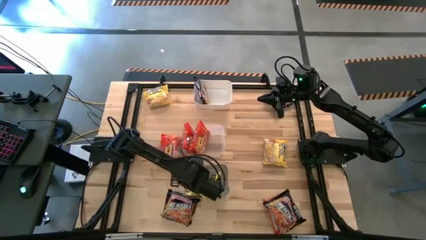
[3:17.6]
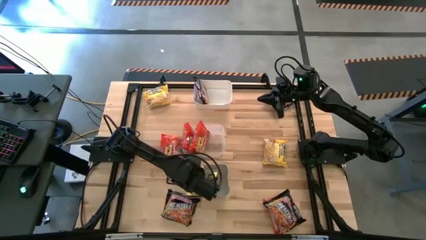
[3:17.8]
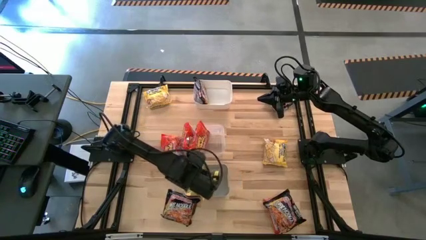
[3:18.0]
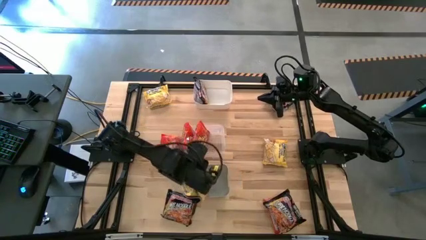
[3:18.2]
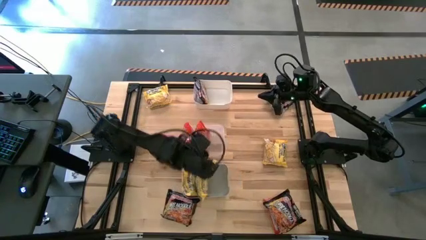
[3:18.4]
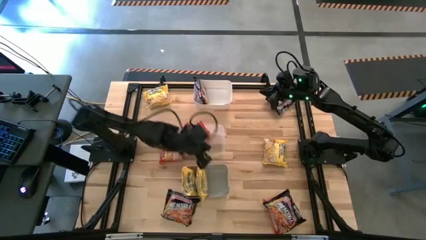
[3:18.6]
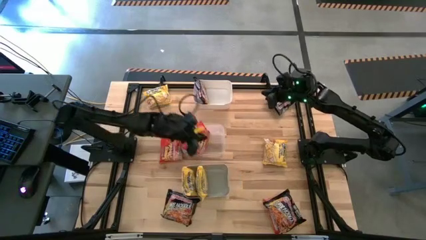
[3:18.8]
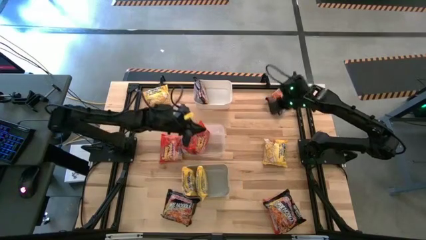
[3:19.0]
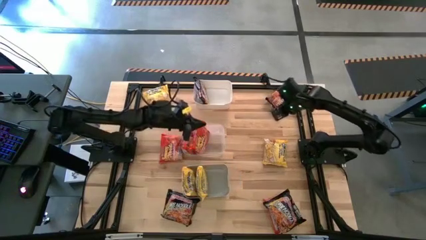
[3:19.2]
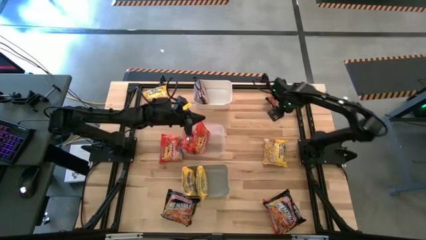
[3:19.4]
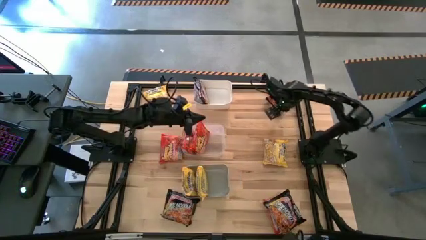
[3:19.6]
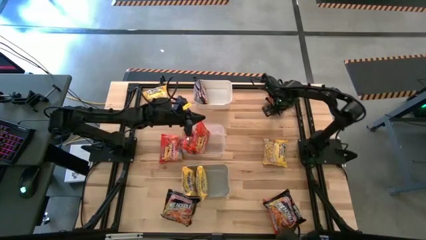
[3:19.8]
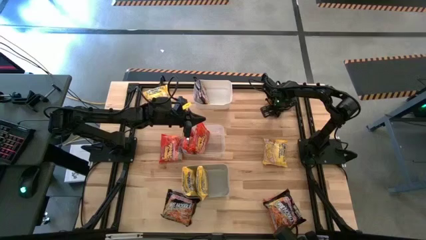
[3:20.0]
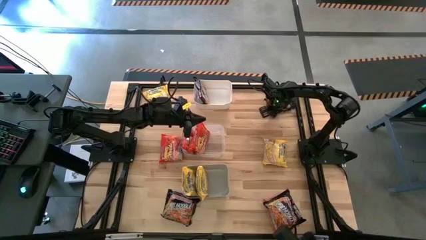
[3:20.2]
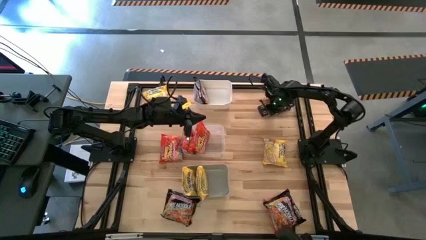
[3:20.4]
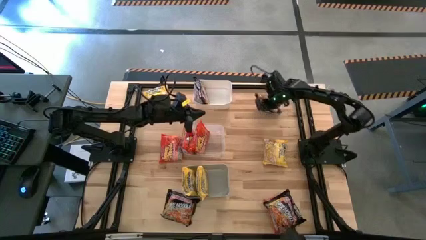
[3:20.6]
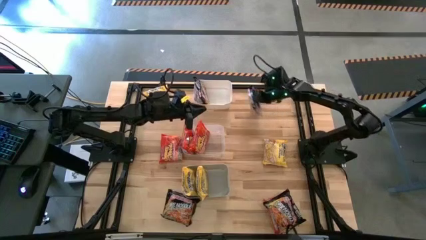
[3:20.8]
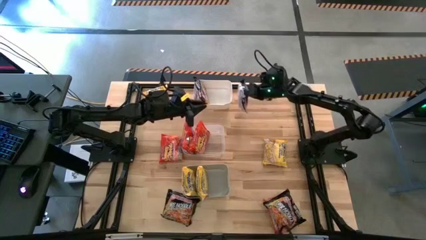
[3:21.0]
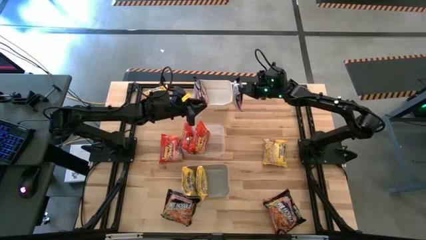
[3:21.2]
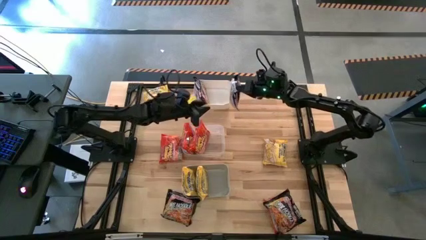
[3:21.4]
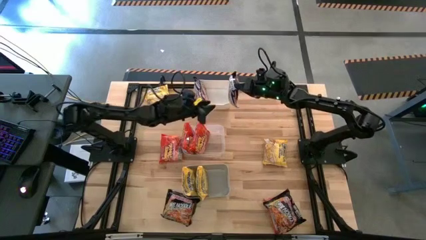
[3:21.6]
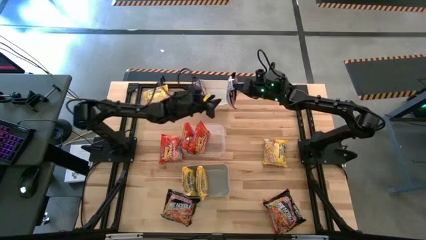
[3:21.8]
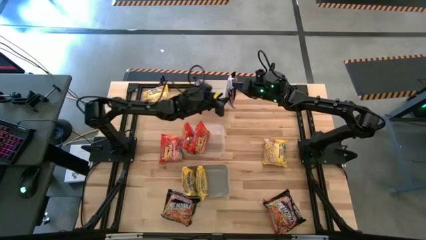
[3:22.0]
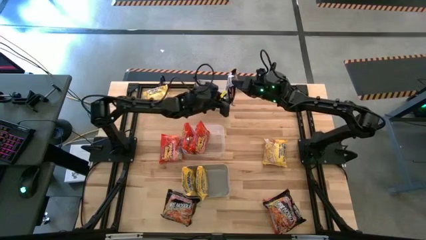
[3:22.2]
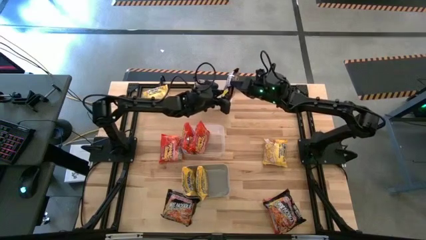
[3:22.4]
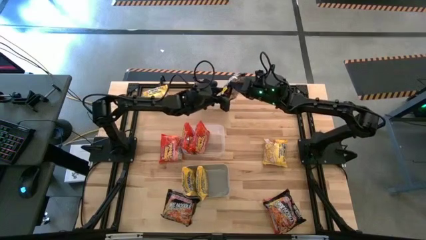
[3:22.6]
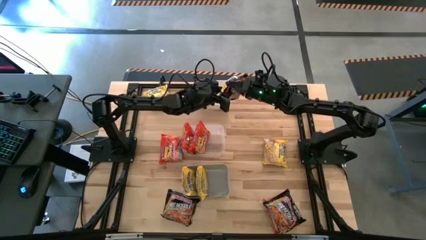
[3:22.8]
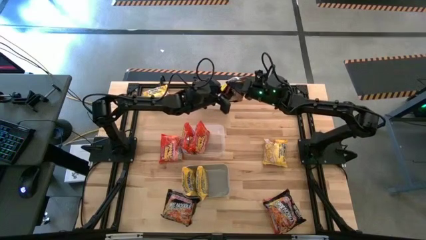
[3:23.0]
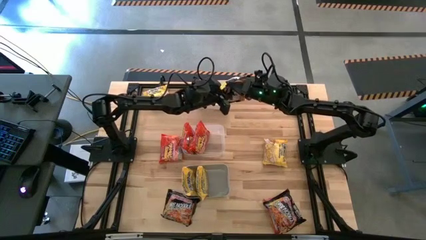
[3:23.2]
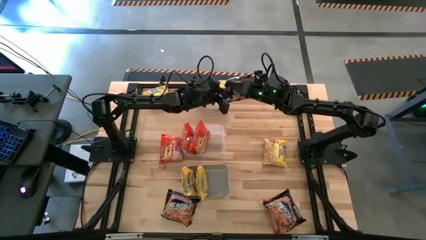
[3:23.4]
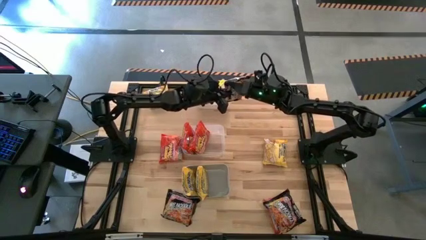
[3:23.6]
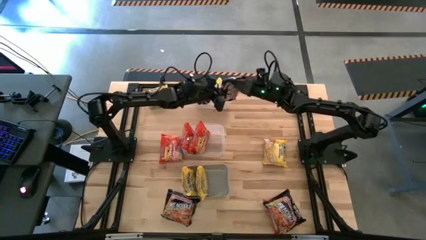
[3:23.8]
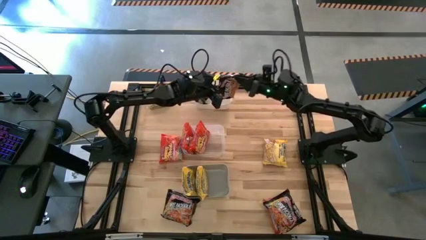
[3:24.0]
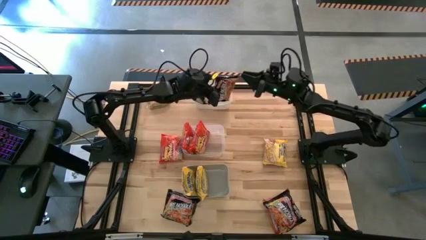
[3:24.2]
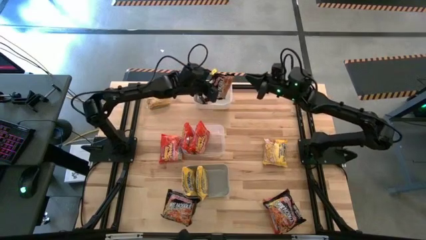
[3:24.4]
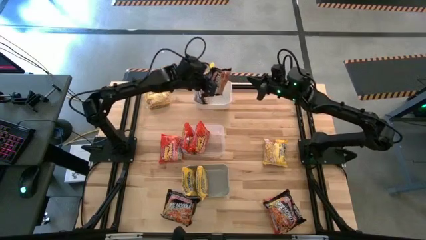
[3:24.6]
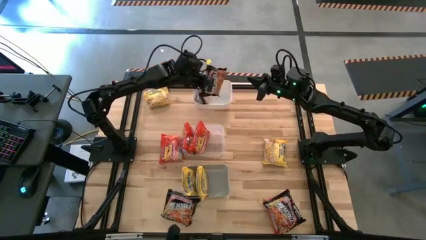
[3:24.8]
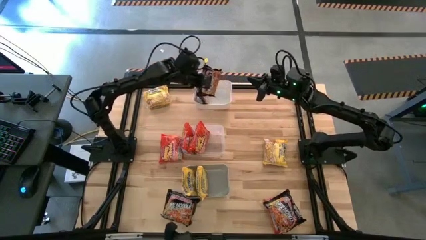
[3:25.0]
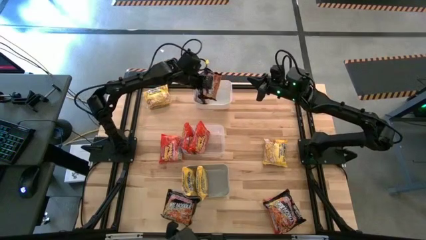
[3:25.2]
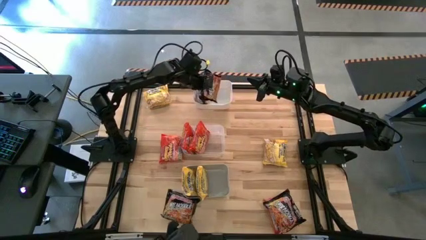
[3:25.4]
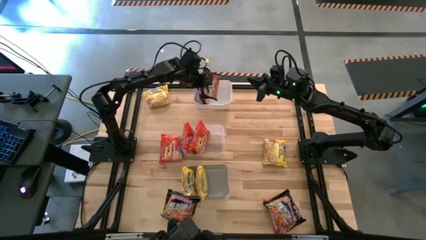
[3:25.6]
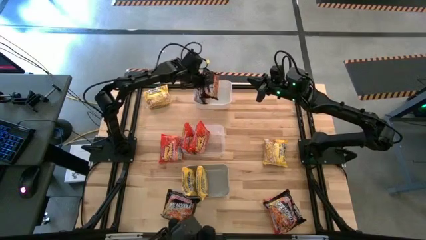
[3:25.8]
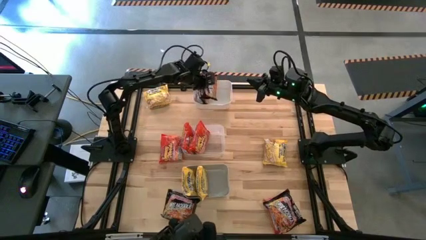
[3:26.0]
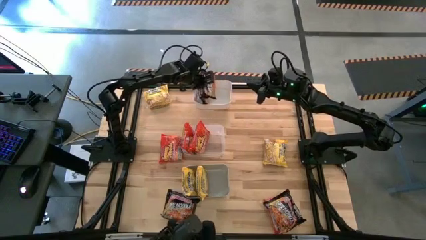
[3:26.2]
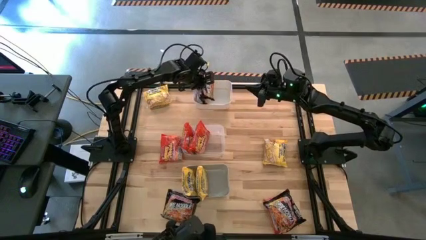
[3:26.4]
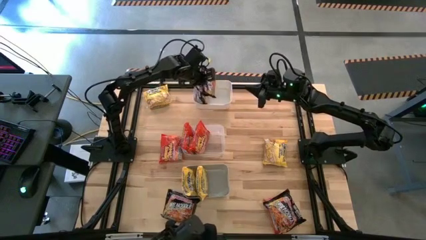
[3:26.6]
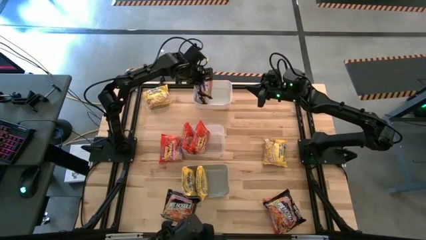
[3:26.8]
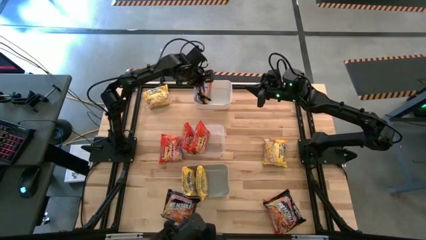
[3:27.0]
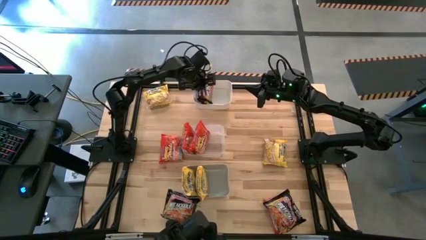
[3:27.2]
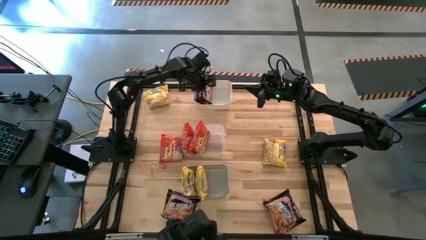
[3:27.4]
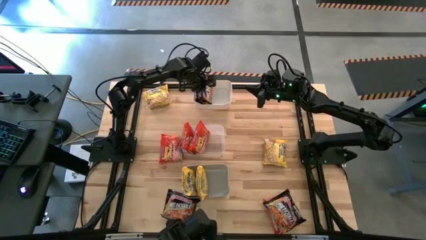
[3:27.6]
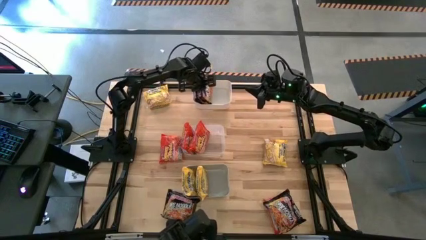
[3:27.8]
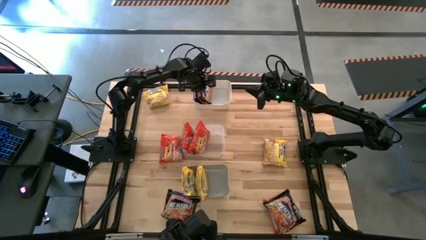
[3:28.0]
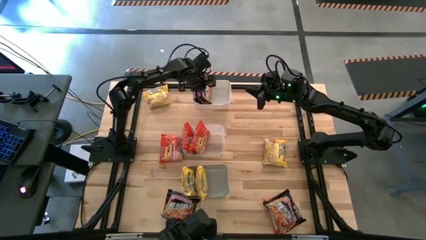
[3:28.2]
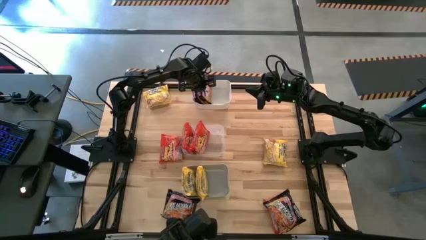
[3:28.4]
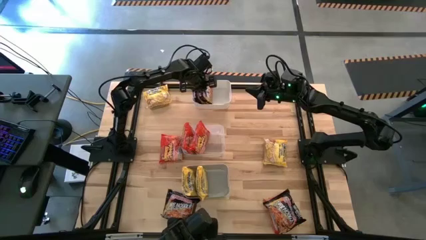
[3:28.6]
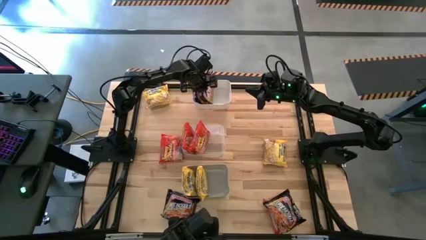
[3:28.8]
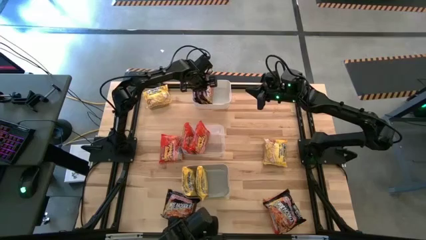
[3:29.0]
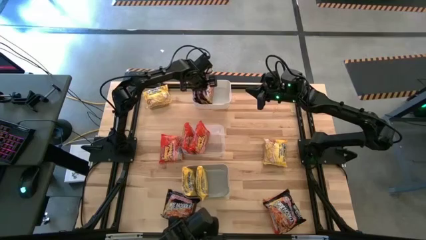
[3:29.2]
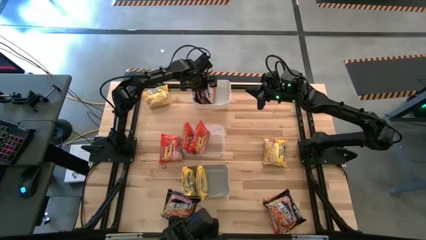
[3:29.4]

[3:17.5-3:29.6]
Task: Sort Maruchan noodles
Put the black noodle pack into the white bin

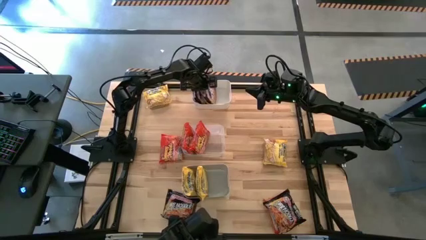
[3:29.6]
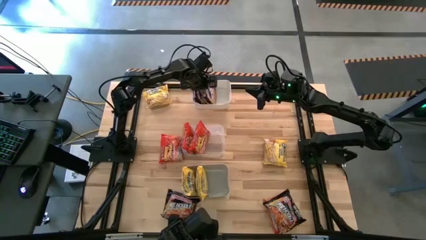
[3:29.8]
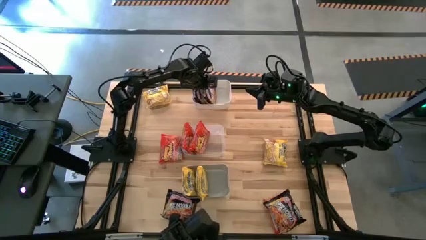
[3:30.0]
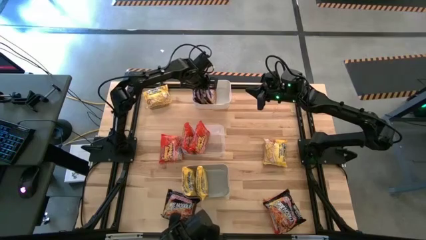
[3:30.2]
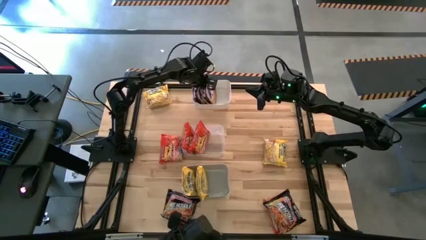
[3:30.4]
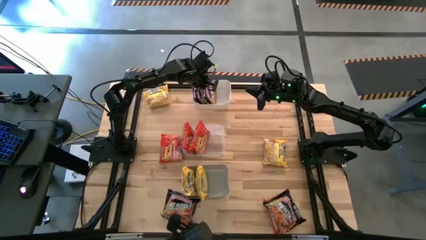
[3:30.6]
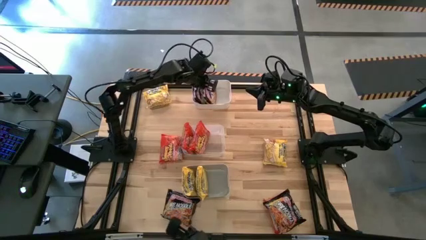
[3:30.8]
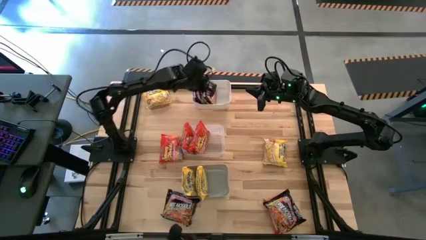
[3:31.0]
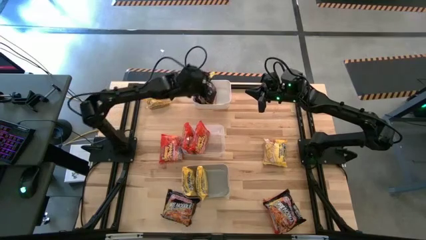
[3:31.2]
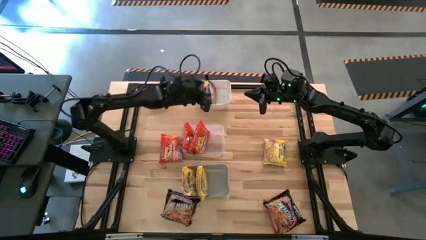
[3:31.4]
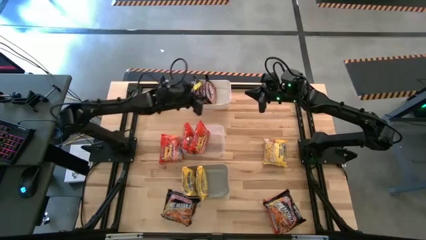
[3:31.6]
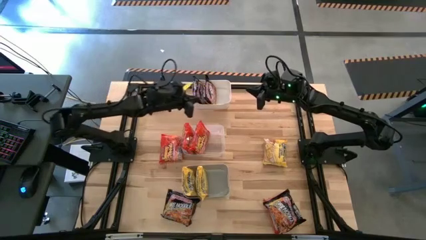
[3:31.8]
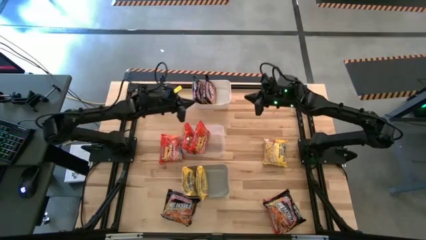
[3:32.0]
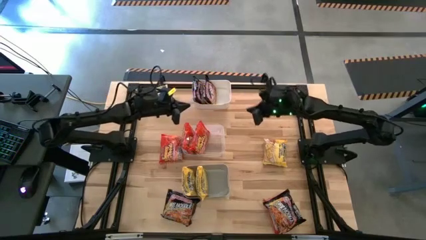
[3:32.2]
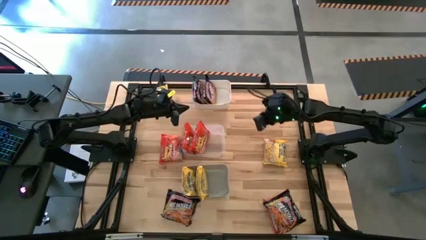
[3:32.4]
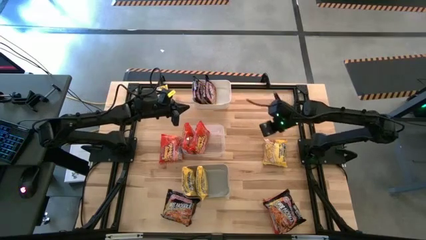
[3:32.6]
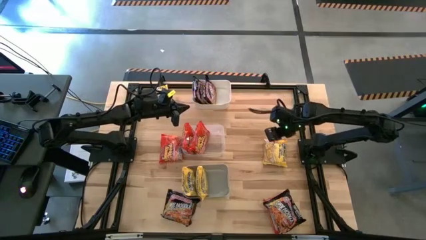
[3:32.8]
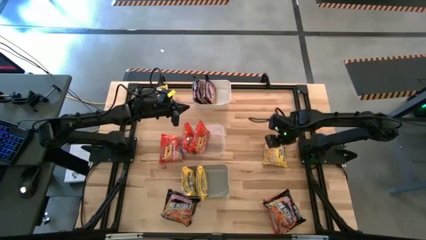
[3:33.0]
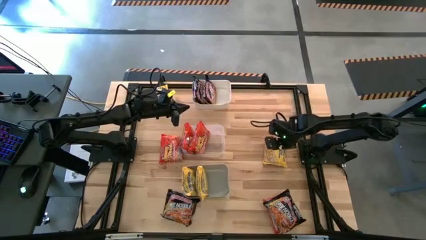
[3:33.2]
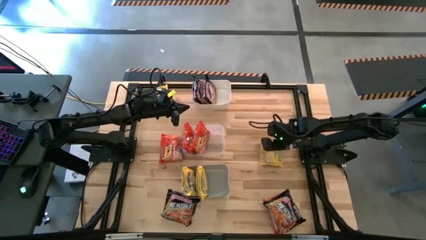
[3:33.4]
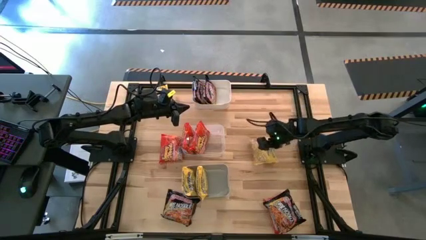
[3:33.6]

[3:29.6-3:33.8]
Adjust the right yellow noodle pack
